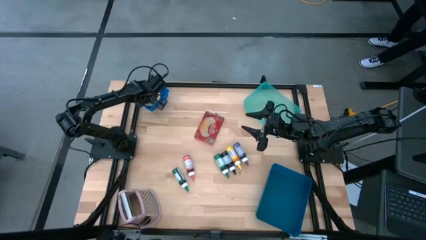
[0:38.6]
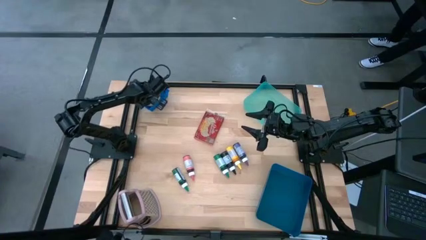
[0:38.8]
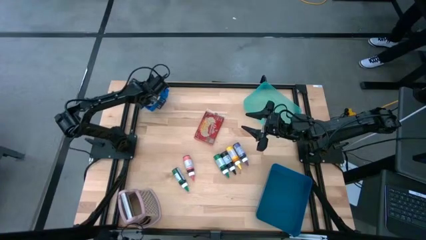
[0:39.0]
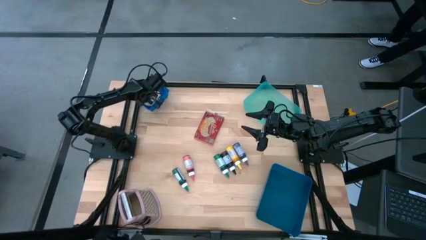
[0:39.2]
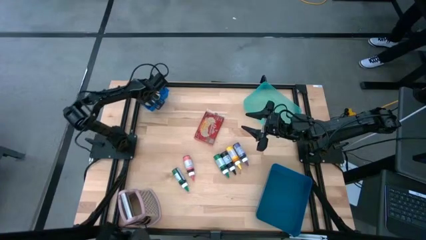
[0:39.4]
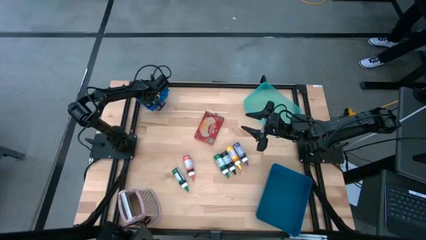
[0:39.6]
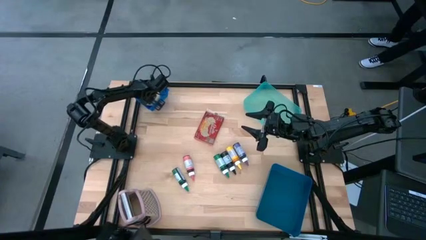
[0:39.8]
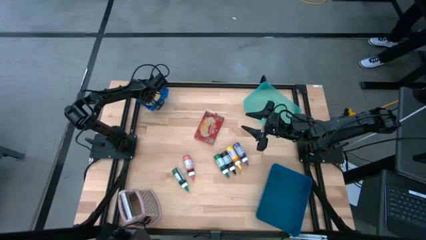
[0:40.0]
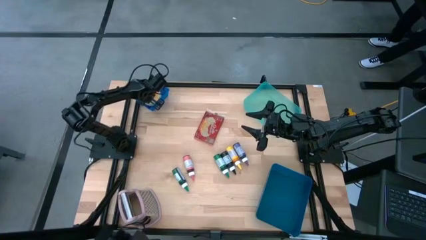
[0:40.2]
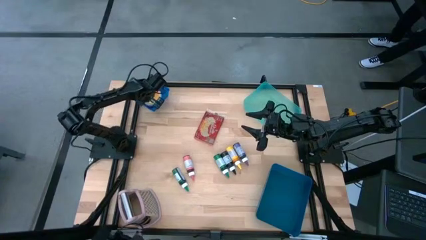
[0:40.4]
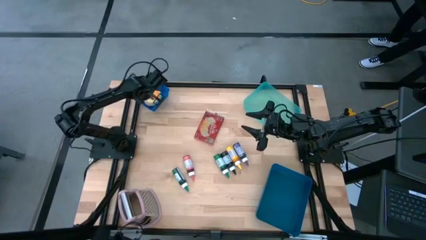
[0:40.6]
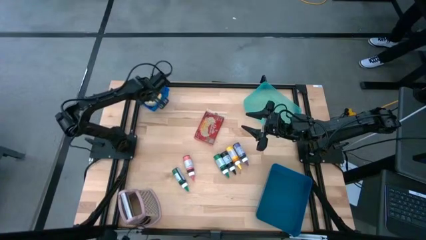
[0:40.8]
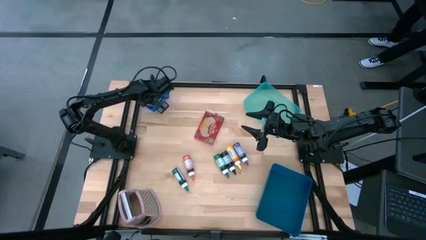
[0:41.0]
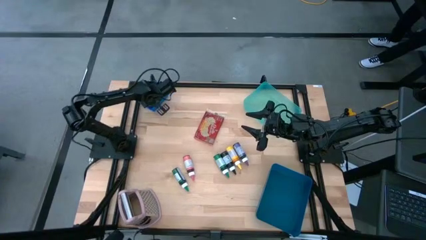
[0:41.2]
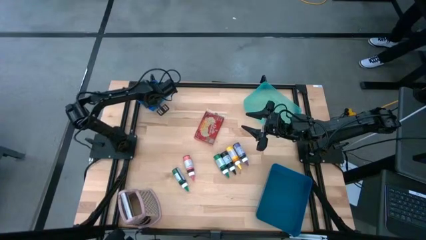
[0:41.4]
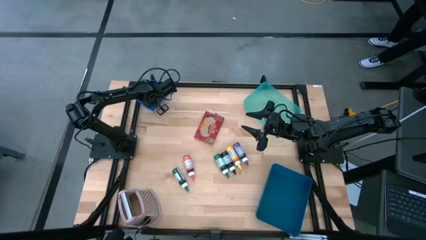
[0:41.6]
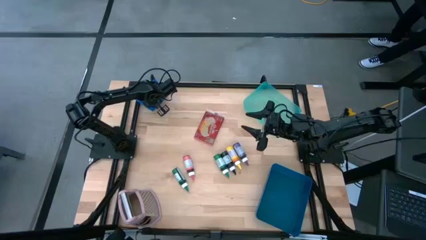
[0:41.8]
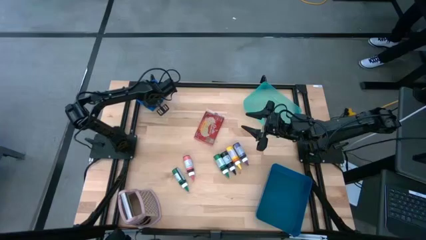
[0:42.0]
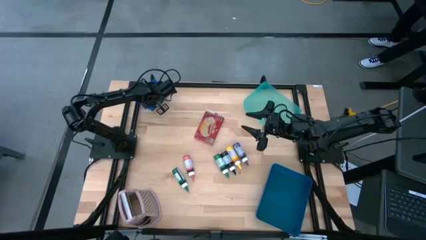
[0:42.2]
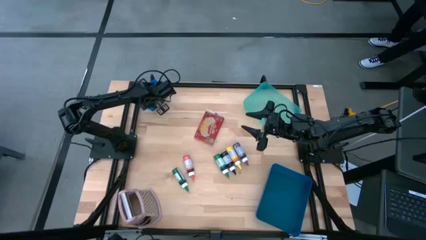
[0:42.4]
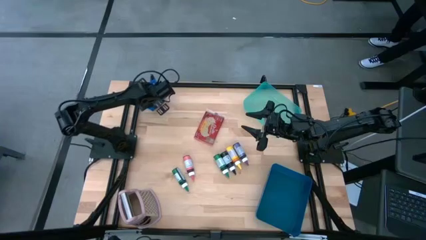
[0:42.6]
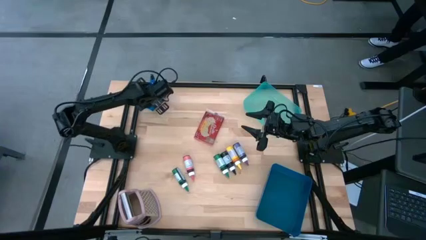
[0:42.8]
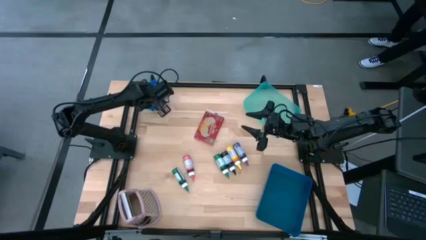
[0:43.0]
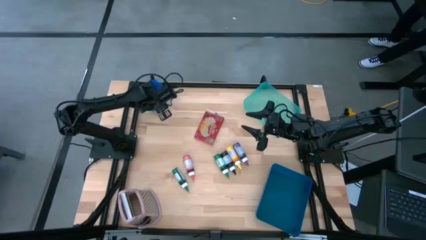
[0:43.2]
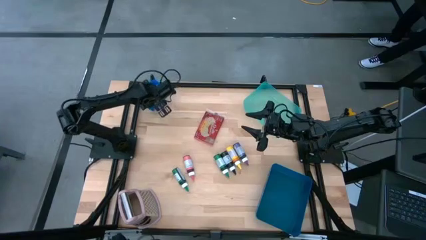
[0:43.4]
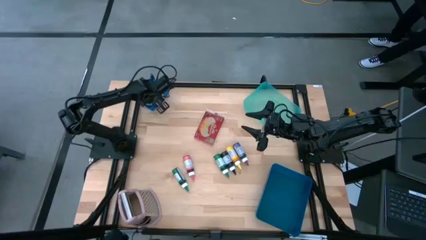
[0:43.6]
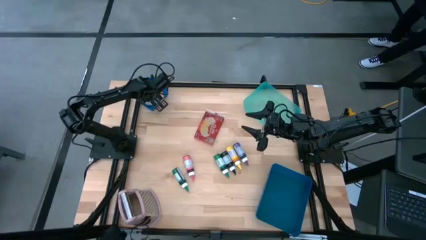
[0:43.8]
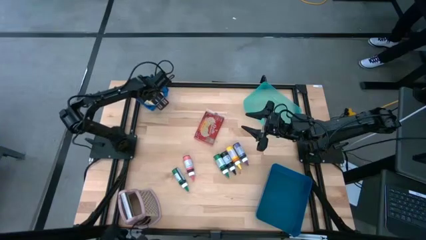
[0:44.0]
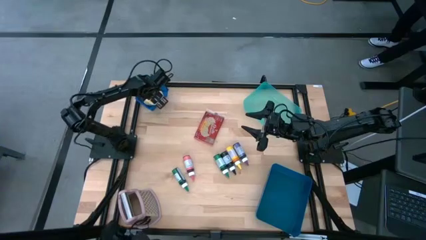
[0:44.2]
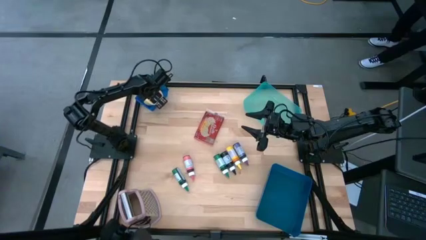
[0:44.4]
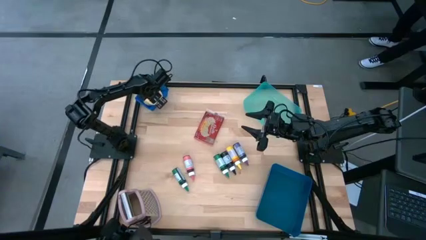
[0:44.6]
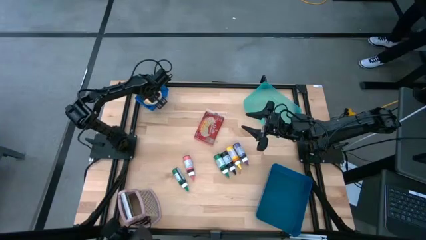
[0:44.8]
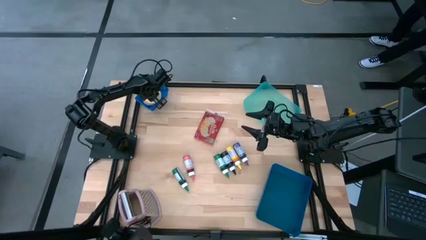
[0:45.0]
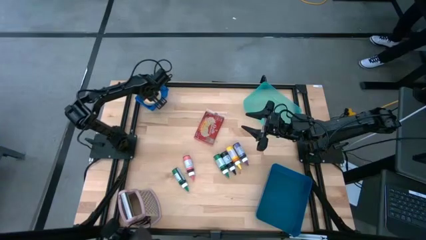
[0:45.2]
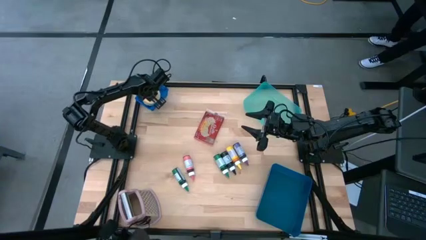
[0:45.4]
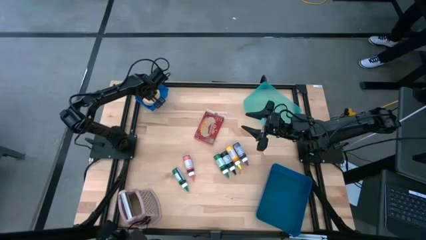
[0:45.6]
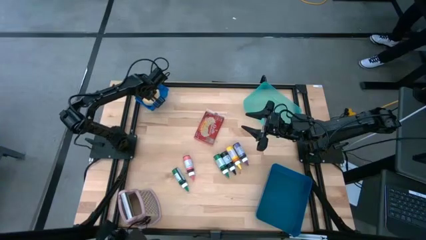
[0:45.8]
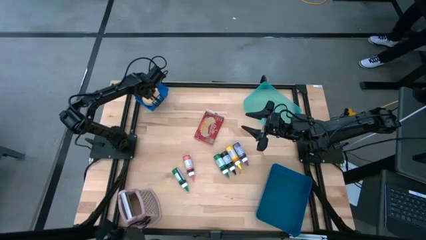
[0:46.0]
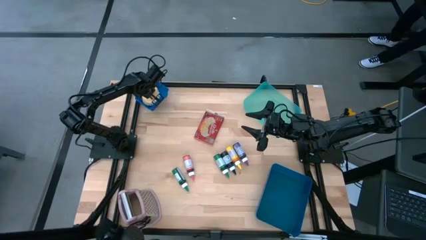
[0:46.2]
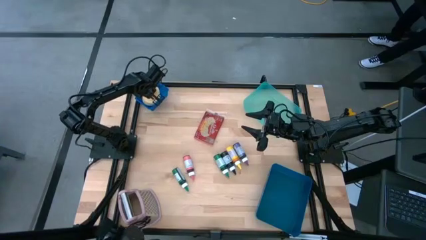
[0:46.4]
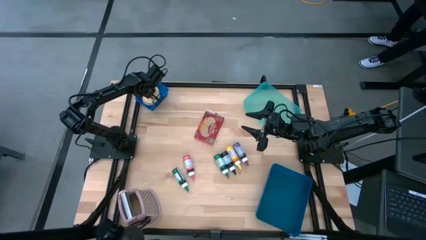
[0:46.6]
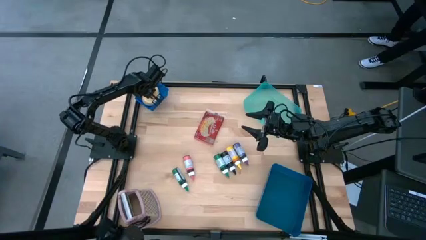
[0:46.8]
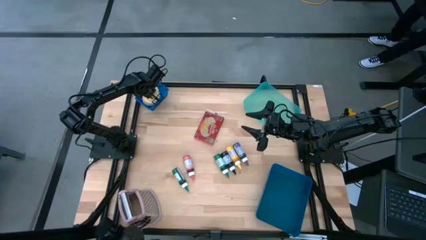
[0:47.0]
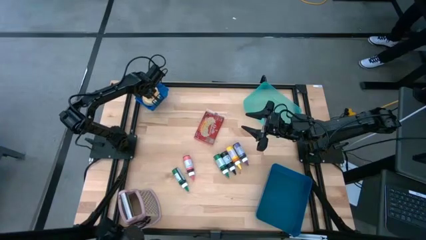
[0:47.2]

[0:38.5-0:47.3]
Put the yellow donut into the top blue bin

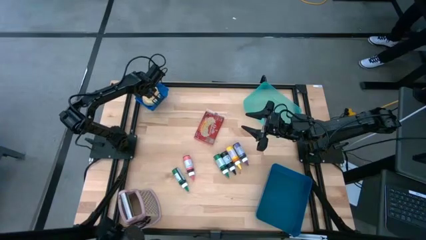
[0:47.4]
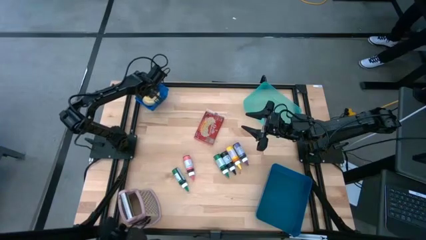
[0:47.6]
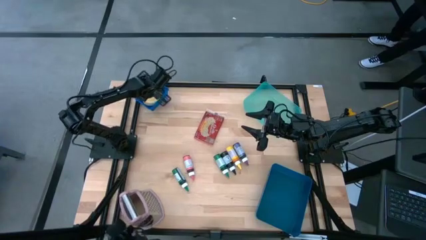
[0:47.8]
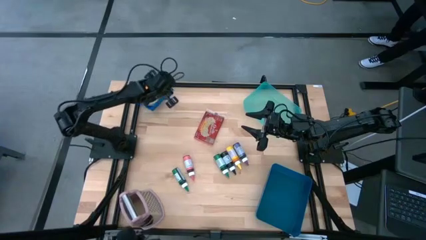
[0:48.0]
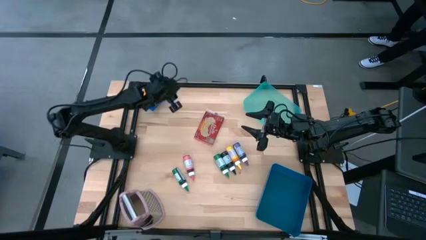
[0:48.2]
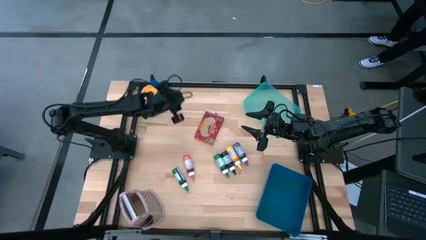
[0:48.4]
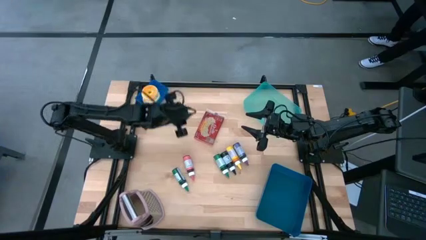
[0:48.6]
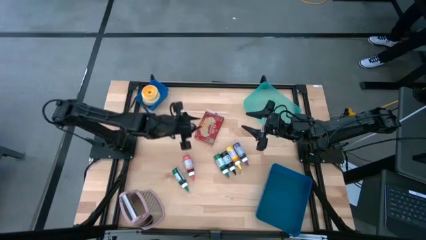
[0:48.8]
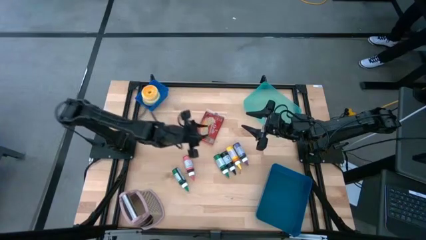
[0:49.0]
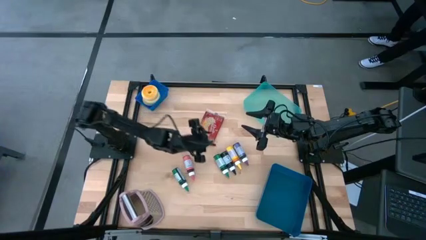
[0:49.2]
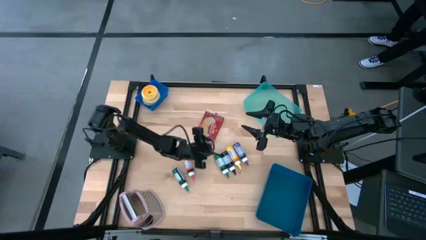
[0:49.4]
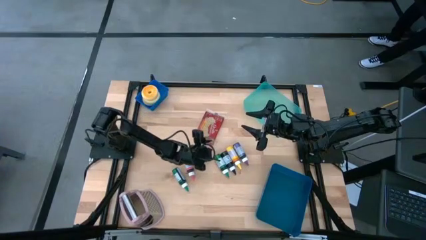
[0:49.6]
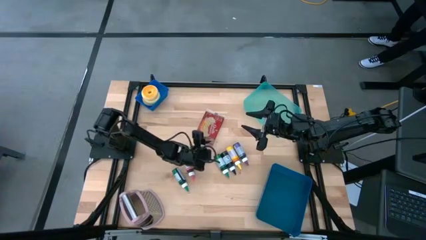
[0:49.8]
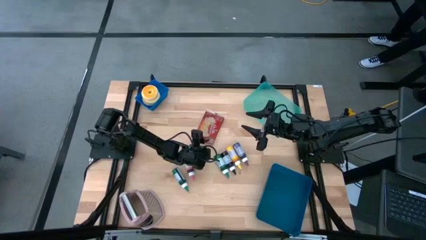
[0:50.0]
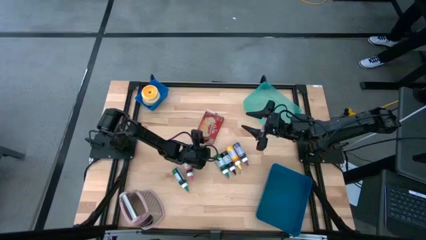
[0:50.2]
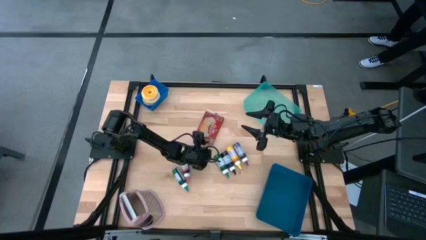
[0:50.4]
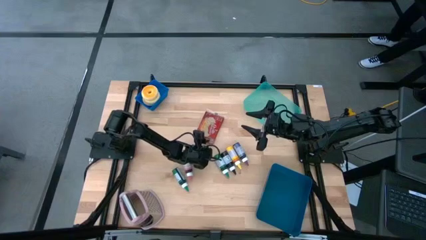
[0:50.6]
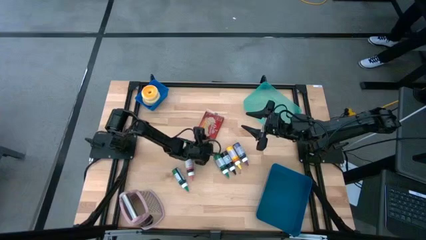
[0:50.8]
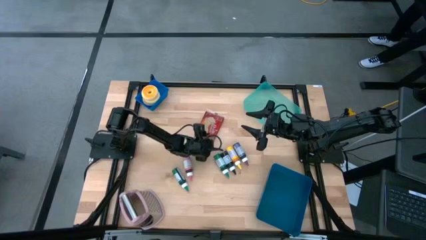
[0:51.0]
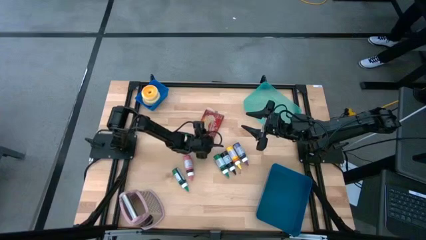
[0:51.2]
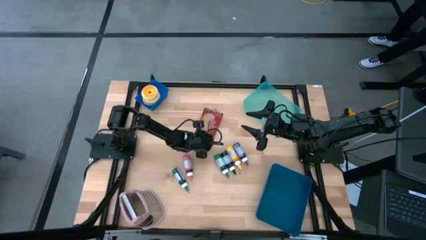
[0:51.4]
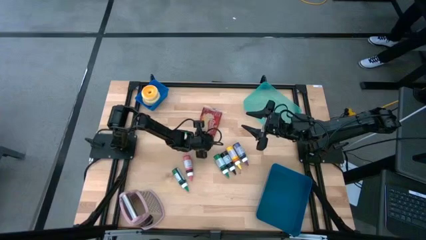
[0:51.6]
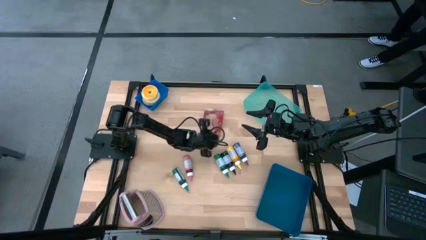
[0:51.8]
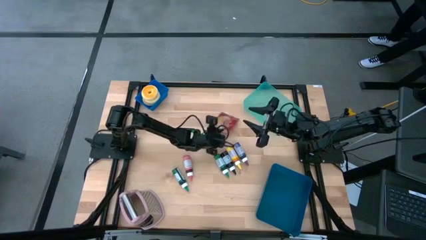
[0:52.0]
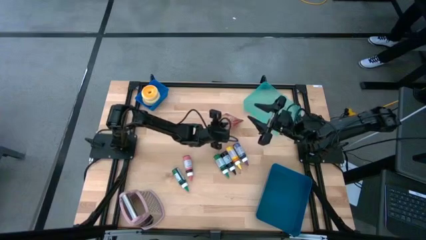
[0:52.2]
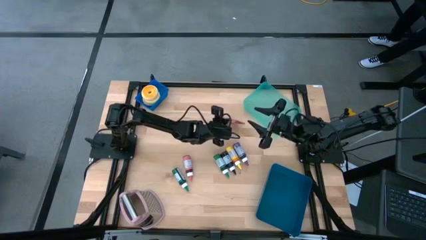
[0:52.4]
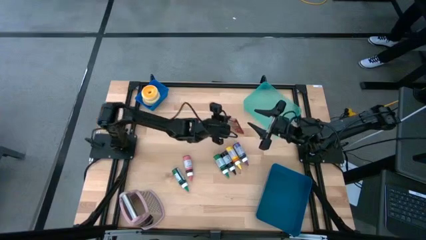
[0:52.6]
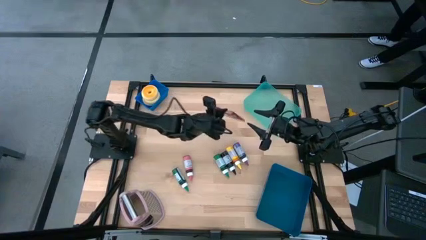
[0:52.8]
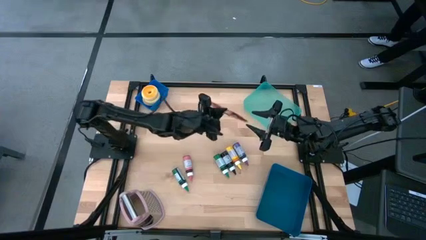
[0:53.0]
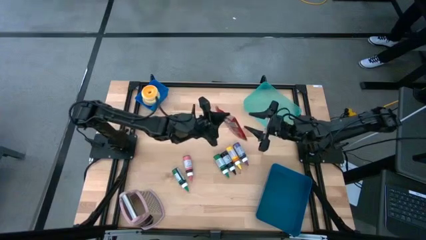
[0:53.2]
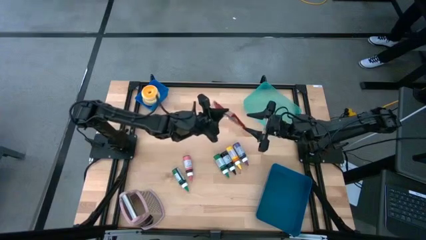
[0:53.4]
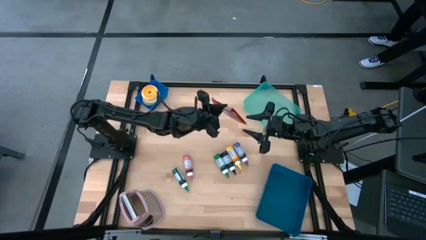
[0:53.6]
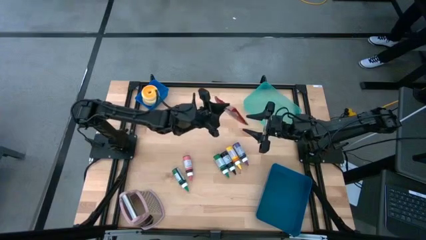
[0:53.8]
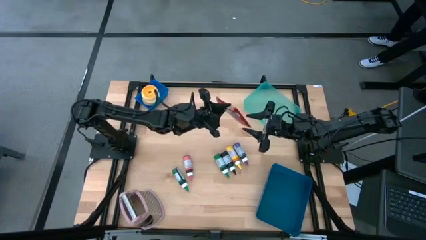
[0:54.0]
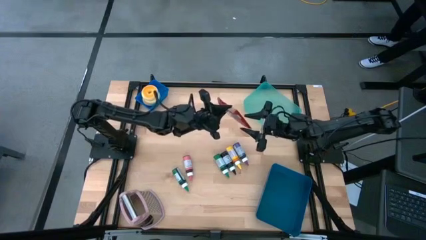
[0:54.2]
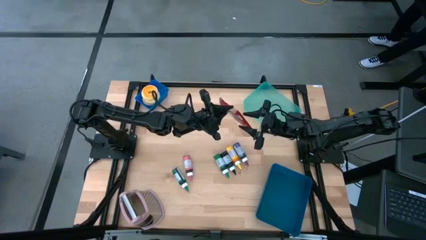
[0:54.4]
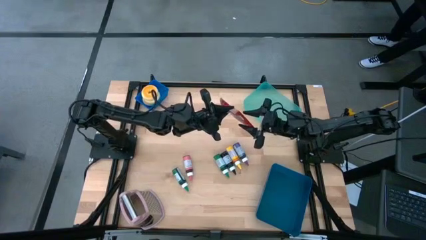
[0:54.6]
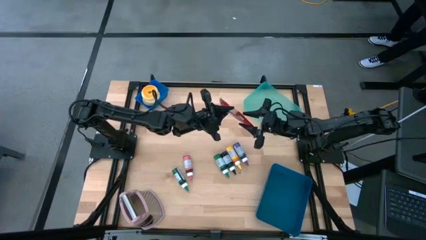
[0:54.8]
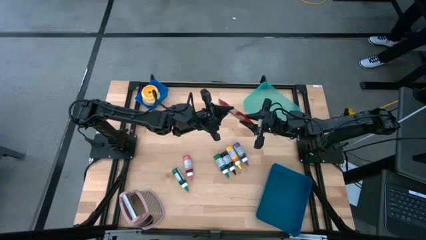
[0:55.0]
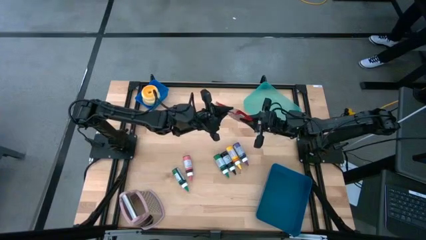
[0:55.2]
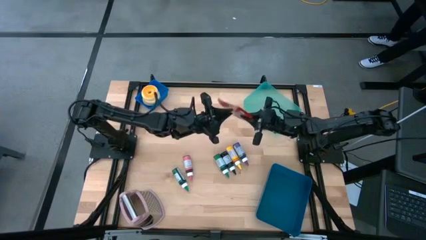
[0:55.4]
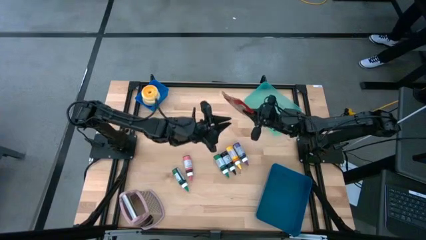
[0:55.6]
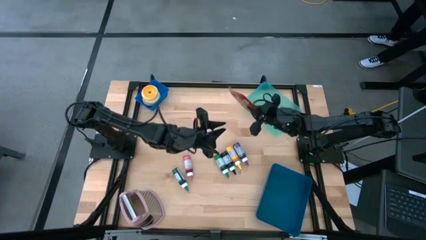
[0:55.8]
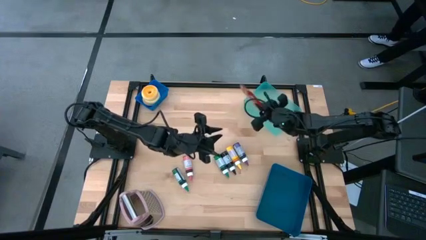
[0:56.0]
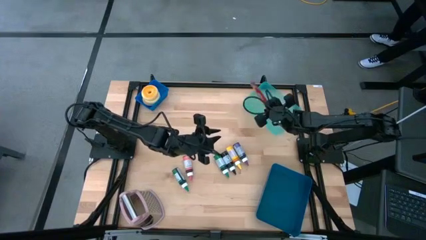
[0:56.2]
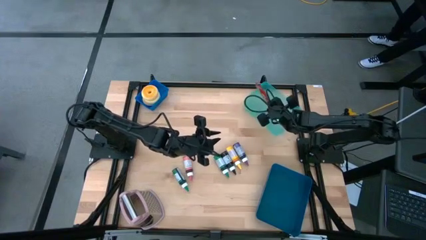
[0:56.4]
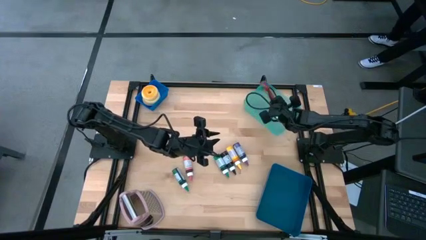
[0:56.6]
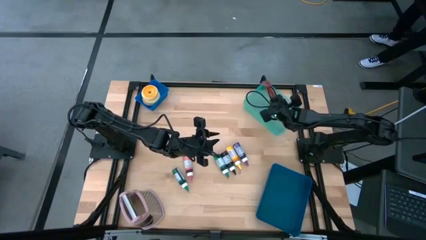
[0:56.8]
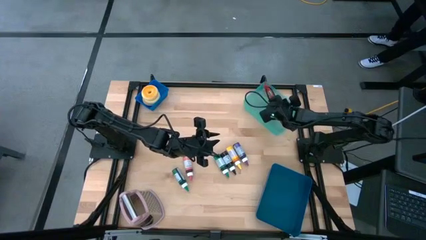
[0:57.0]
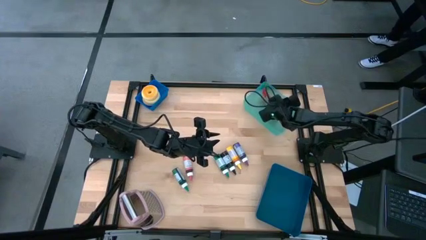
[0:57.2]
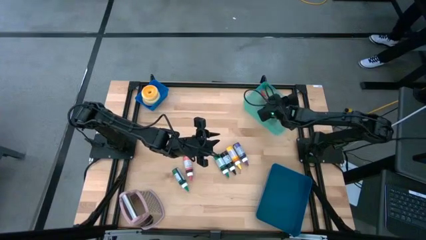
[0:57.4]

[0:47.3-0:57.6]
Put the red popcorn bag into the green bin
